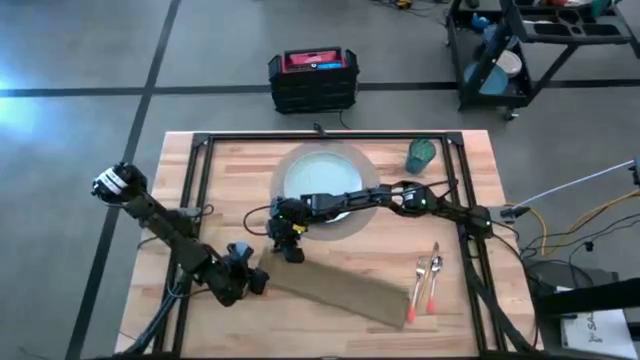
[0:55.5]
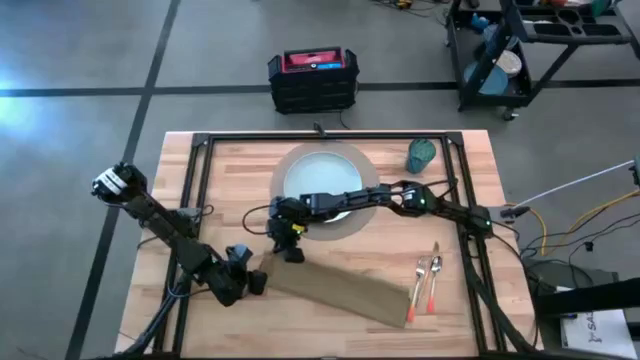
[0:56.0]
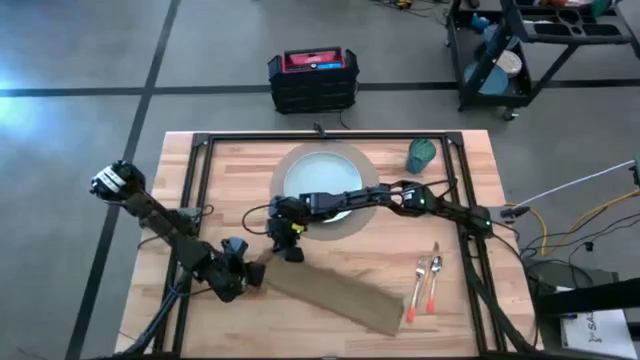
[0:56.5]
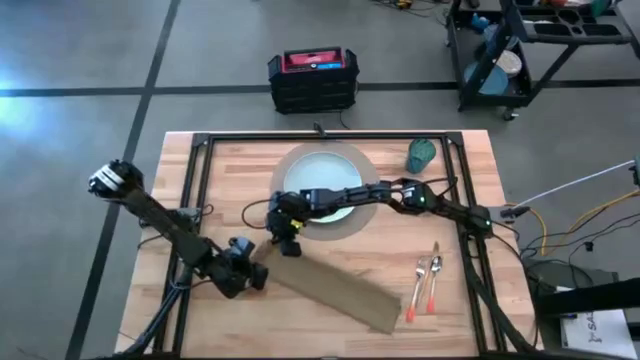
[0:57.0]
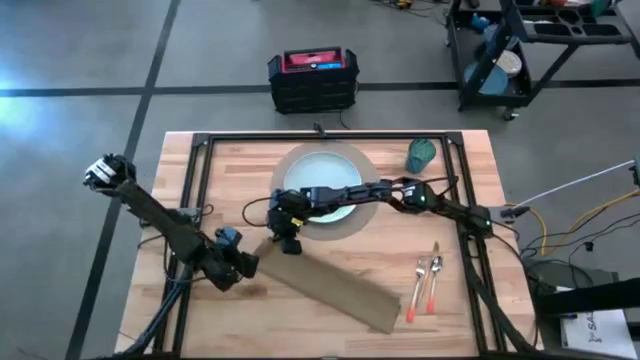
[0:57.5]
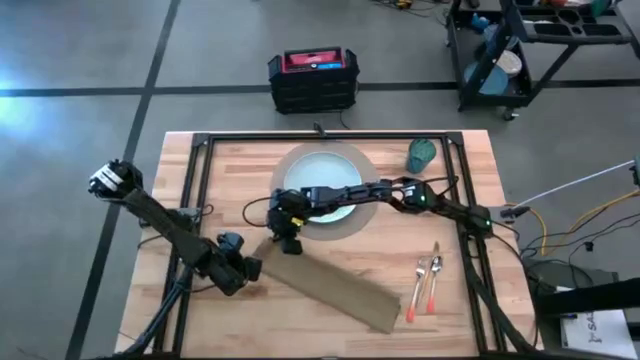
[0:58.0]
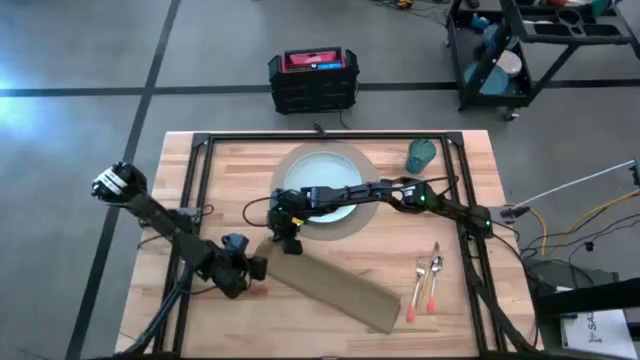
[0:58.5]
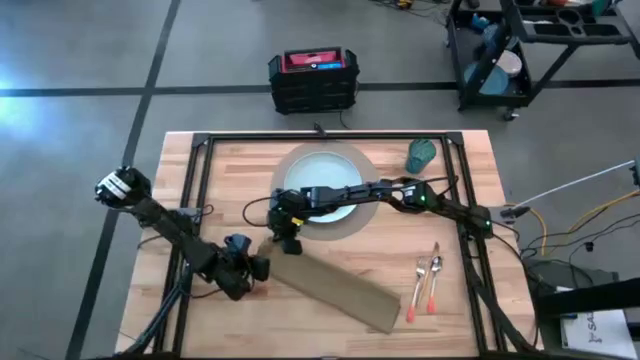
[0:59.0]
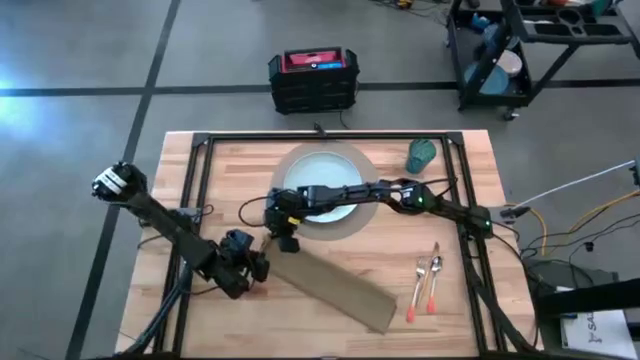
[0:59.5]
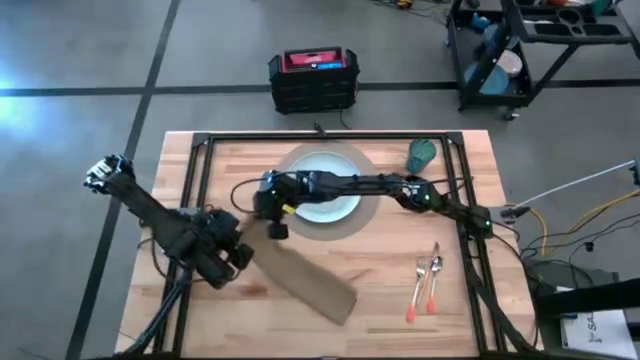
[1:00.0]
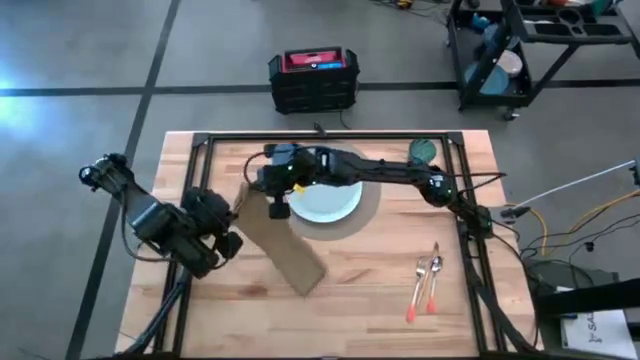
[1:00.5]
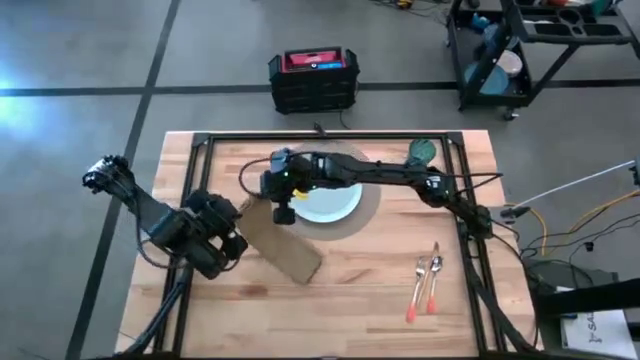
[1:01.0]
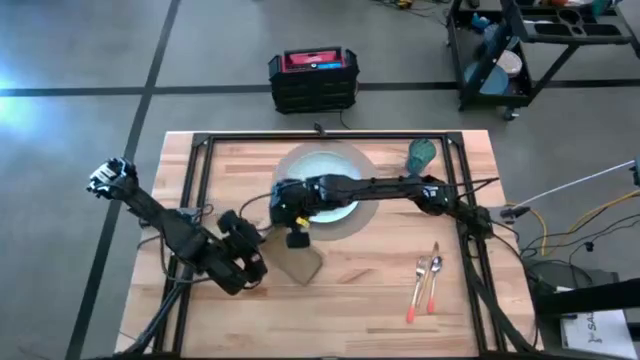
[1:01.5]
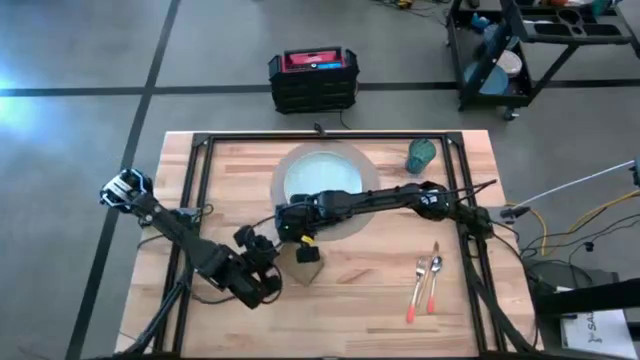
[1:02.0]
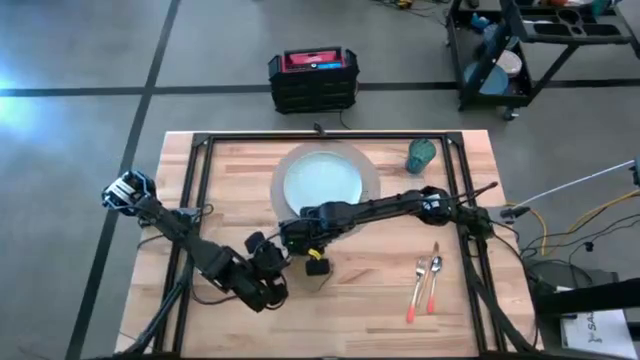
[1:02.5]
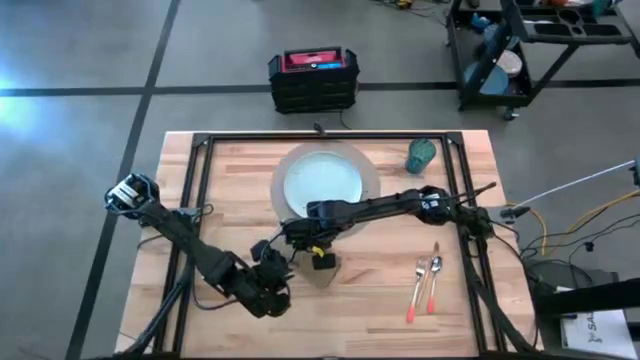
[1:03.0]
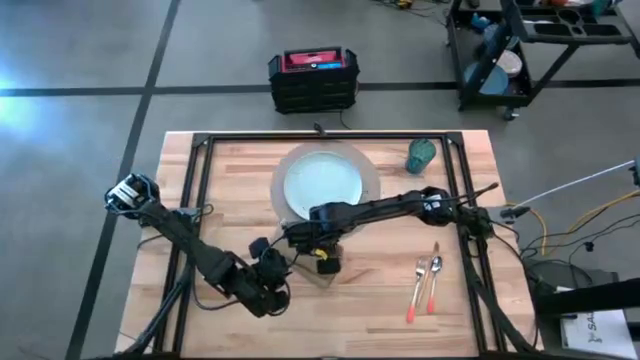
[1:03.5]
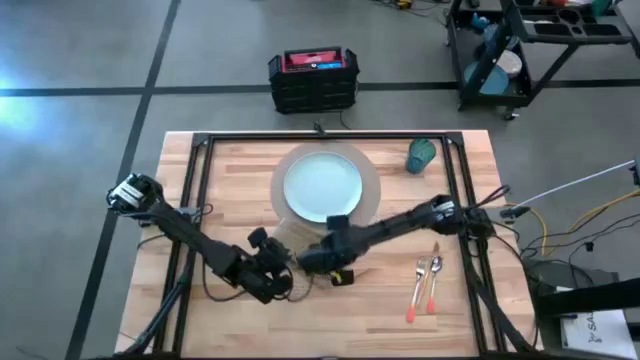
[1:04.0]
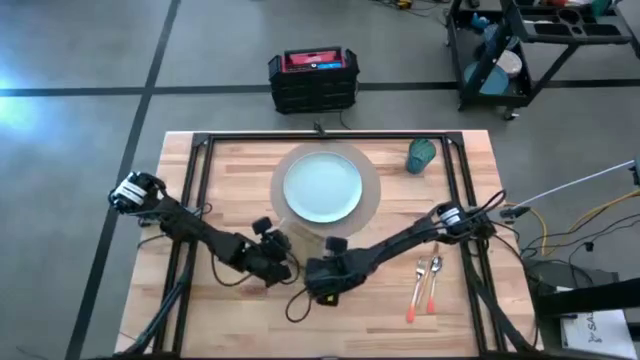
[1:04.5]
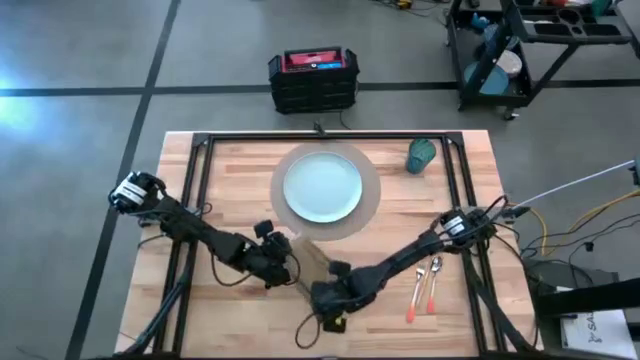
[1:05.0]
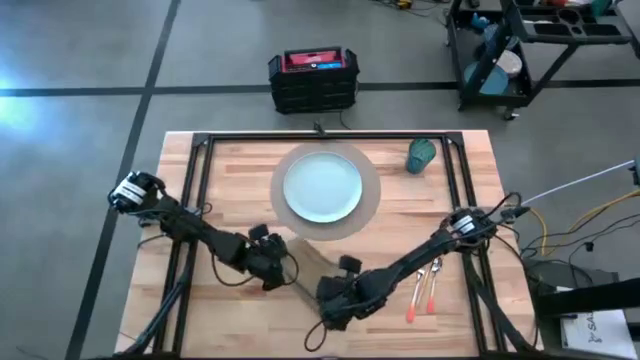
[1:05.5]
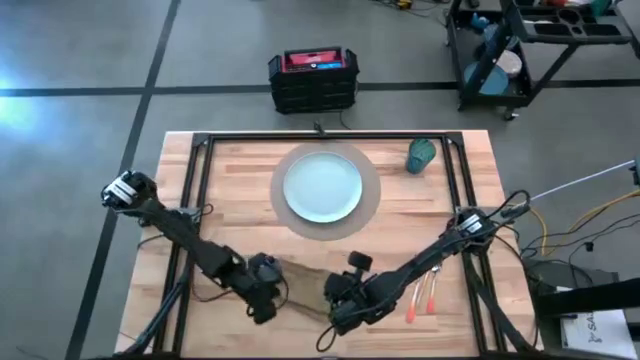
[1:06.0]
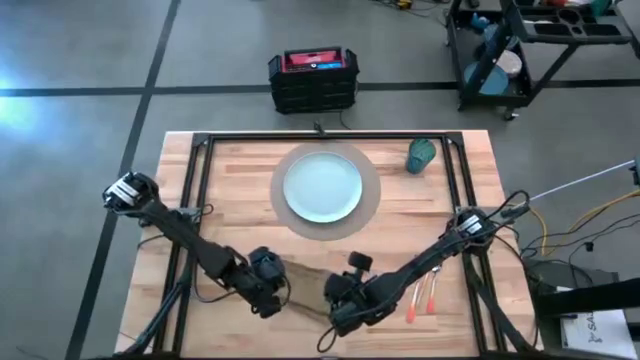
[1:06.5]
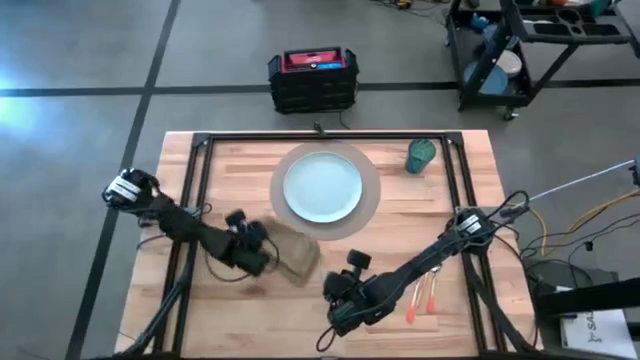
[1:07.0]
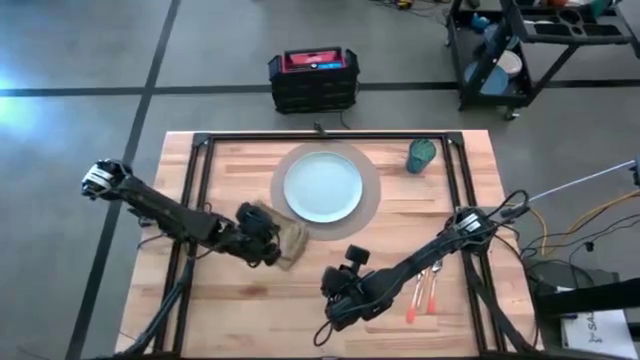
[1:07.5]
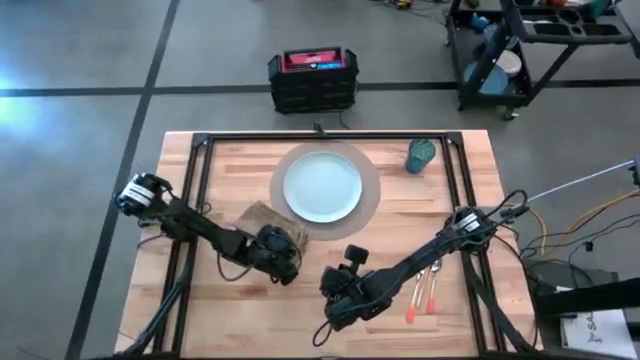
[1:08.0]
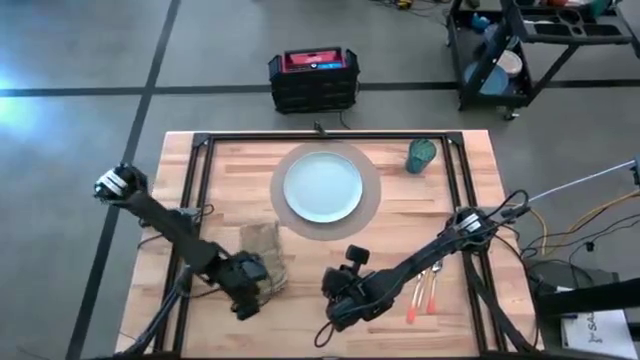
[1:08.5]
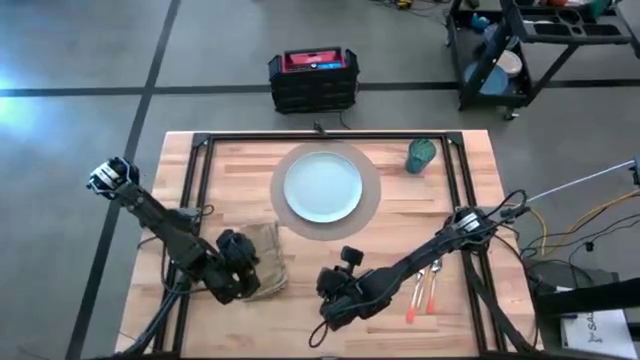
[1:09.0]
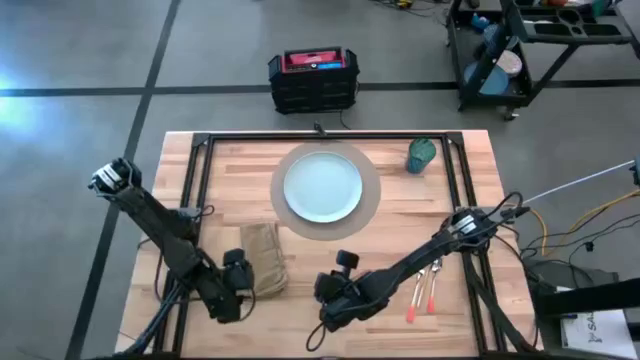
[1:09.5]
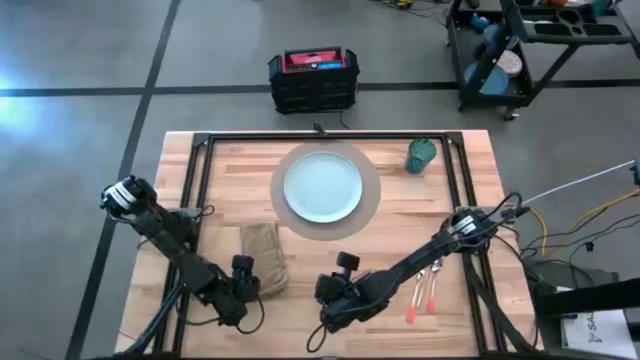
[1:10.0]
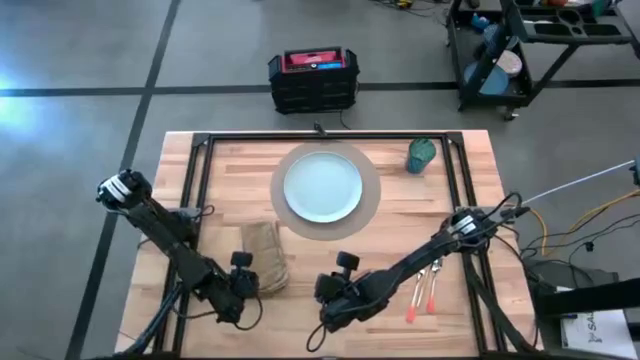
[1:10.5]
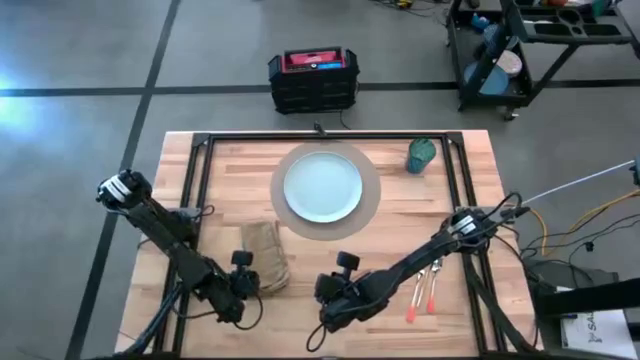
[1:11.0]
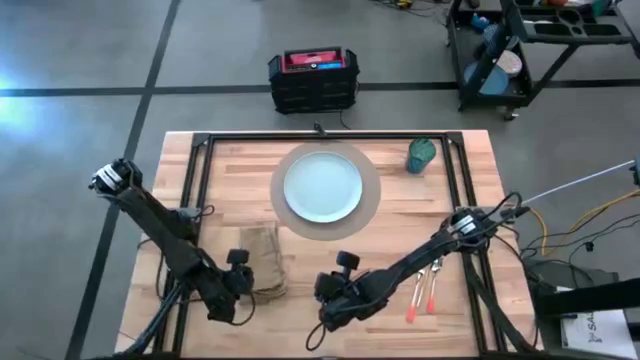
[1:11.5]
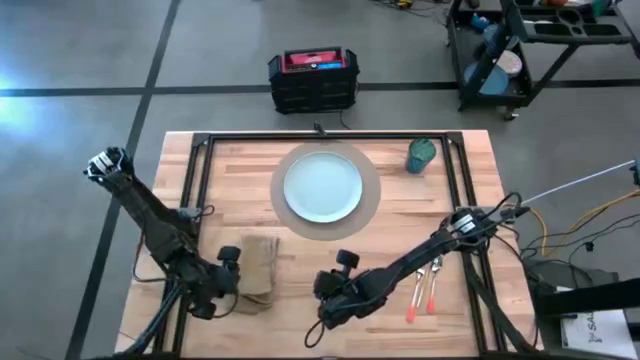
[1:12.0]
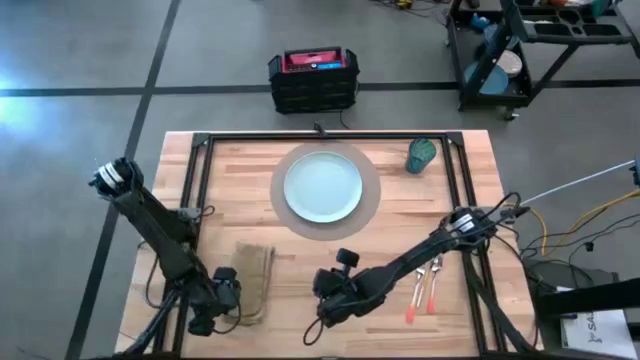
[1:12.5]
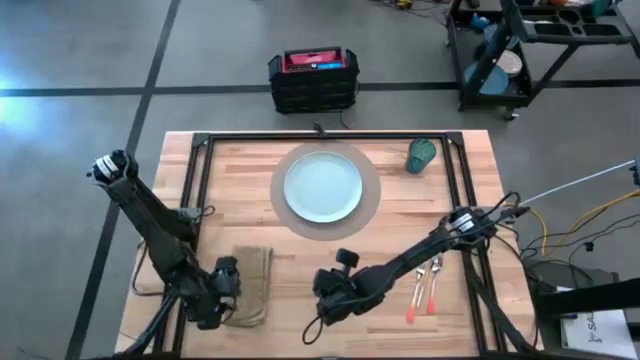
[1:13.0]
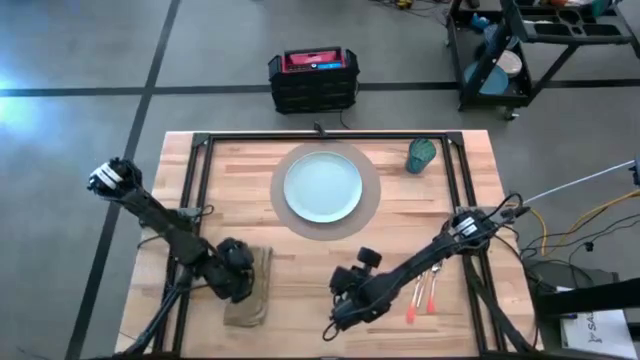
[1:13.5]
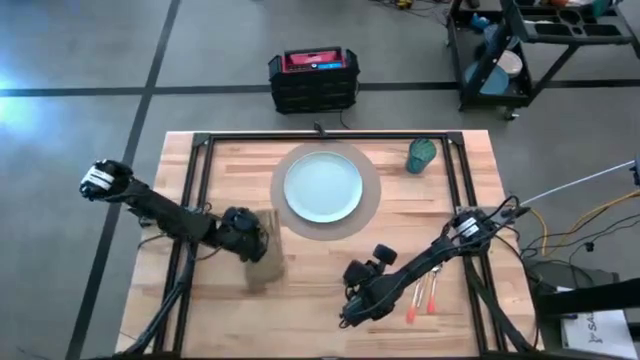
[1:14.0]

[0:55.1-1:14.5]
Task: Set table place
Fold the brown table napkin

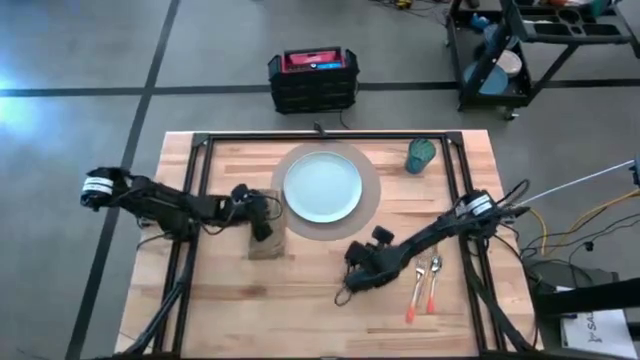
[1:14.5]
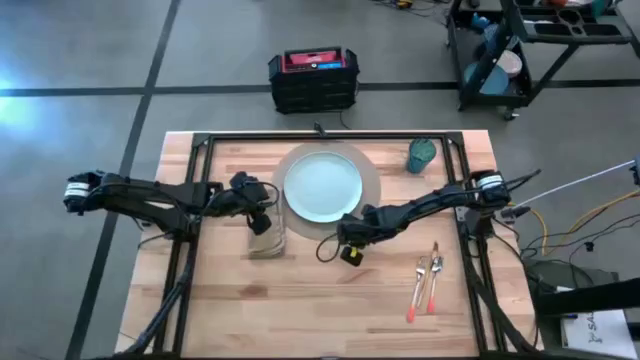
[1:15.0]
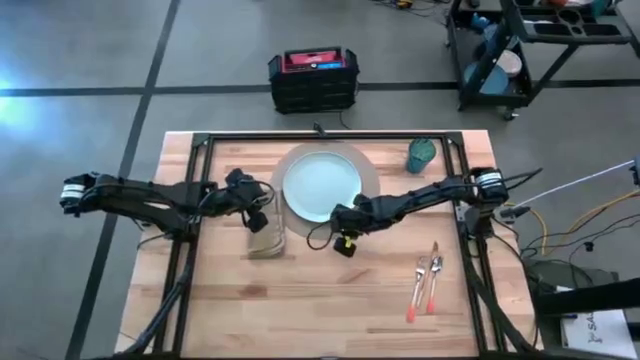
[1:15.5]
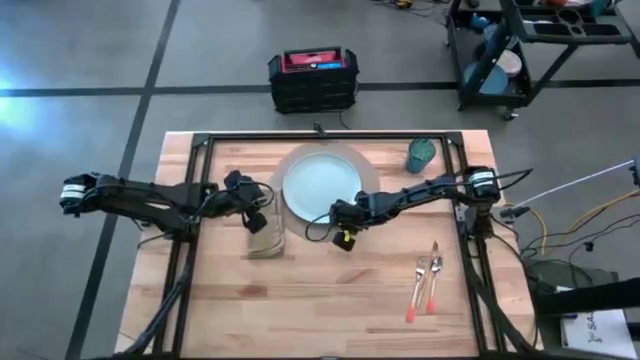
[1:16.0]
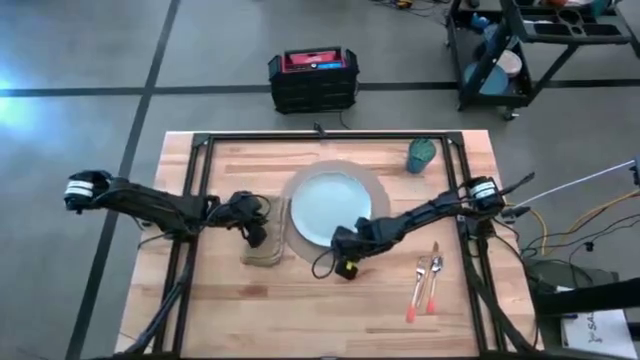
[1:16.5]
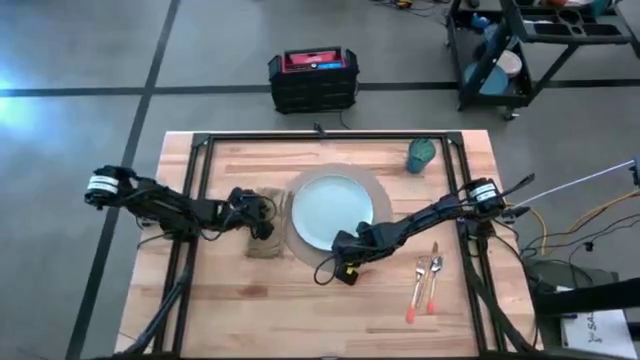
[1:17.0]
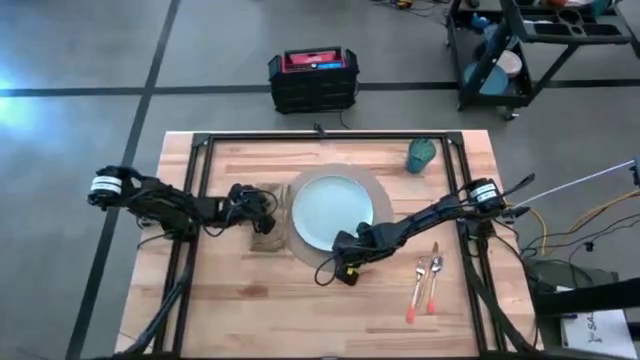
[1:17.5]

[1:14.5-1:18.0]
Adjust the grey tablemat
